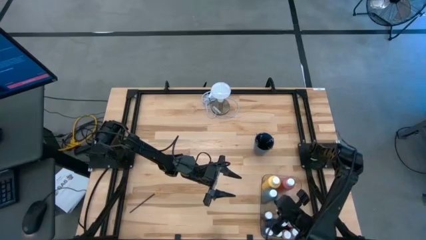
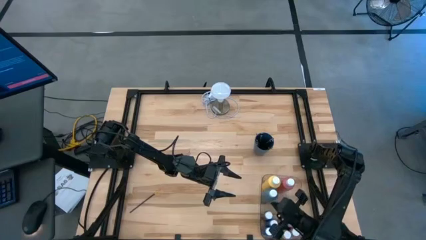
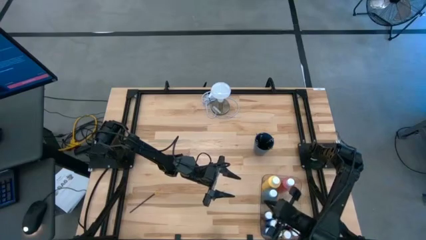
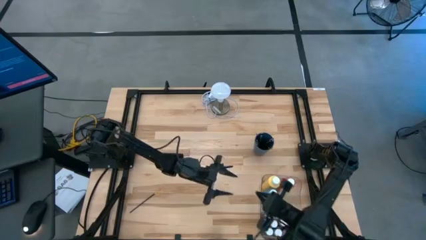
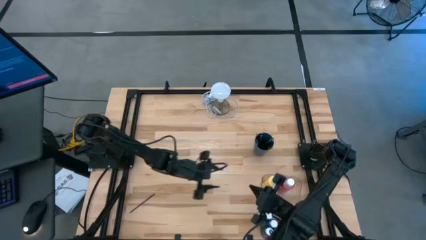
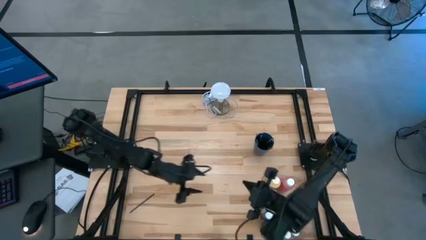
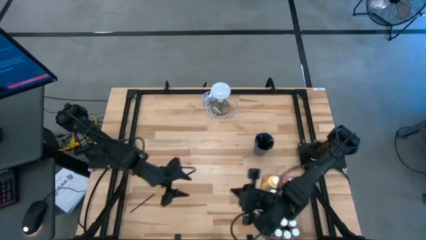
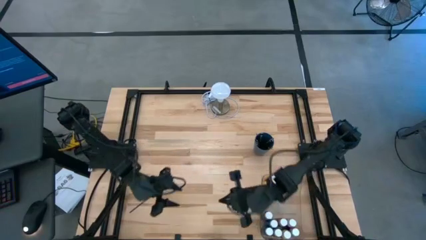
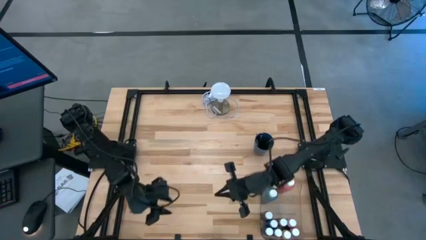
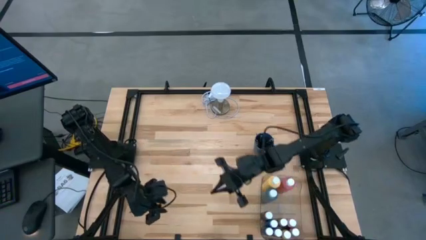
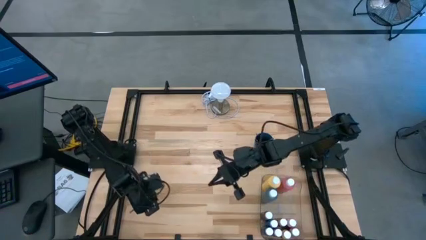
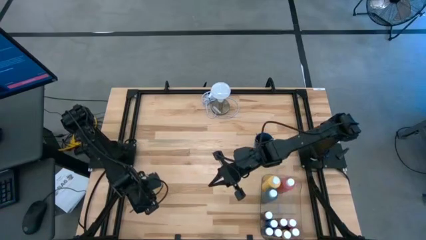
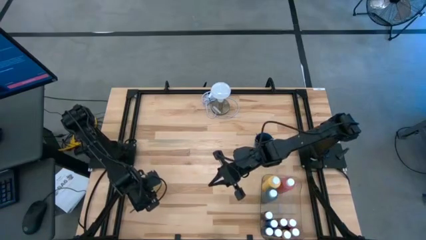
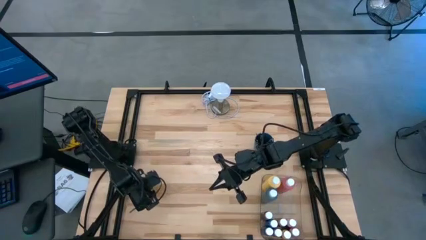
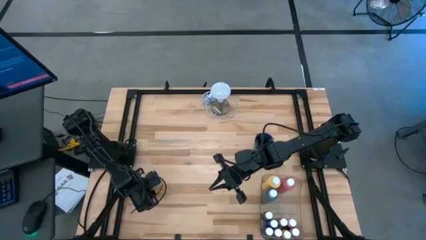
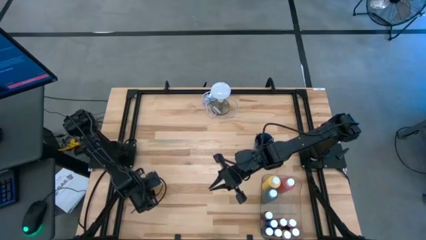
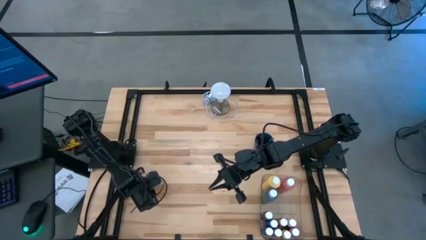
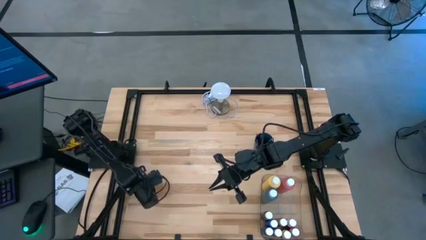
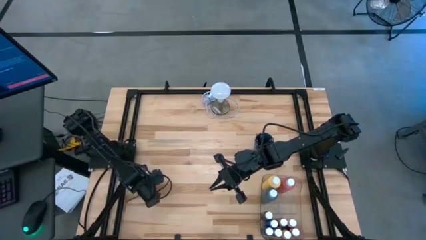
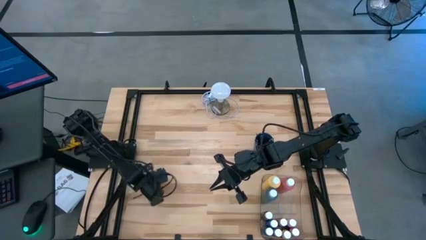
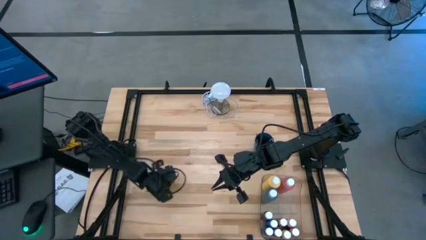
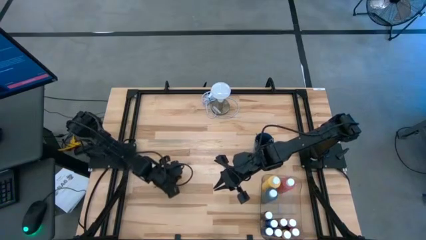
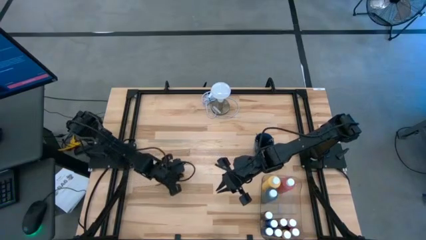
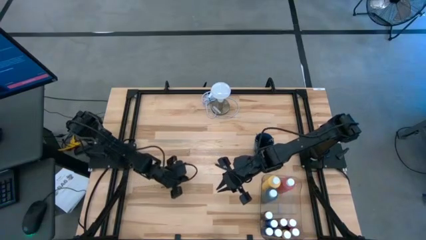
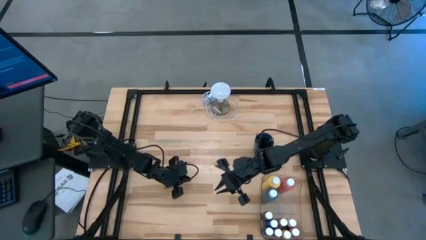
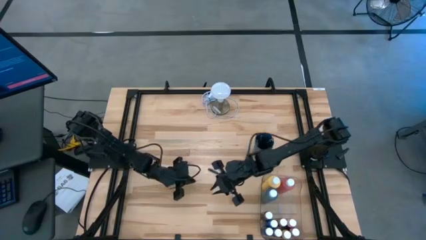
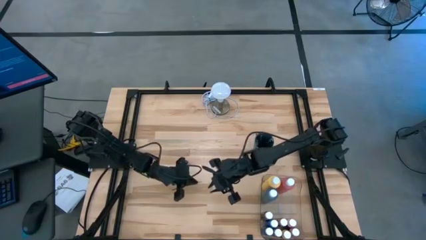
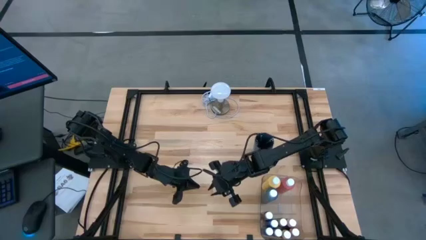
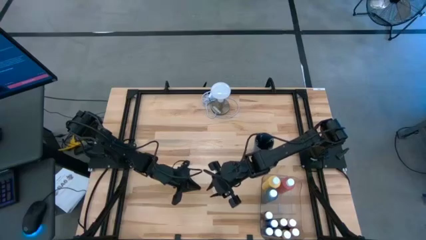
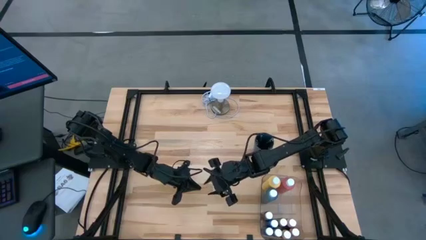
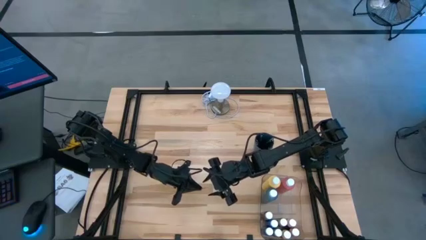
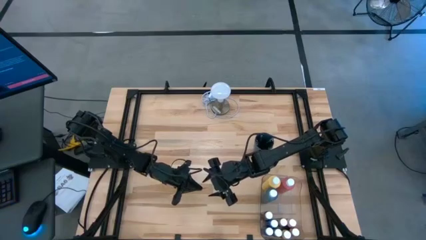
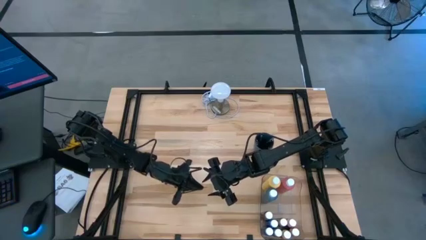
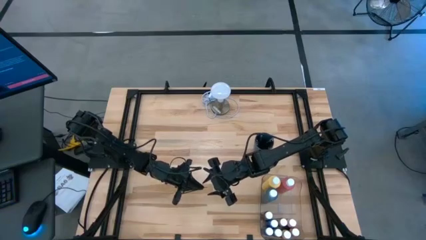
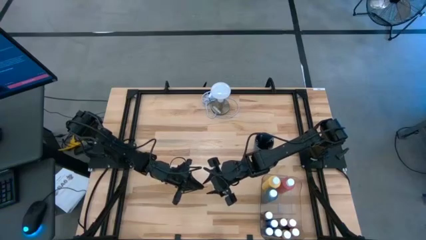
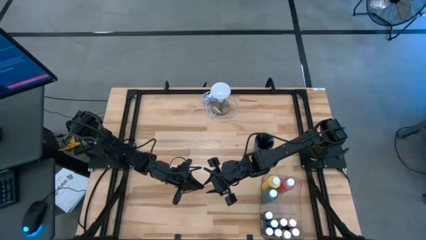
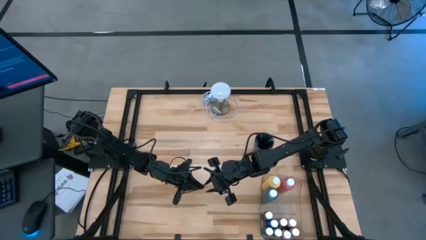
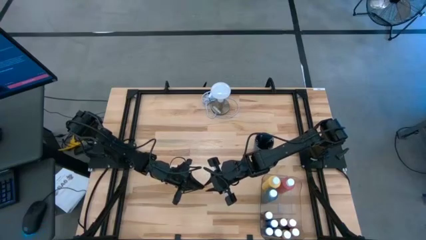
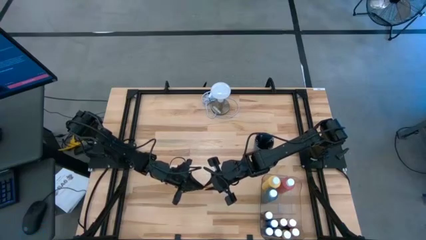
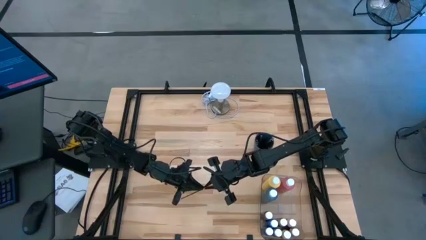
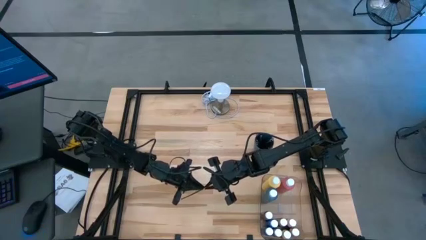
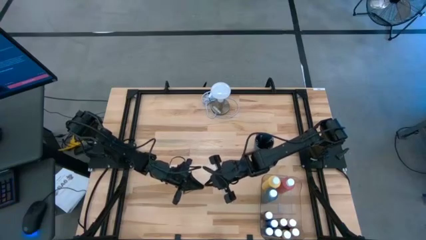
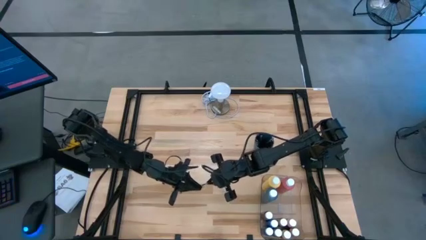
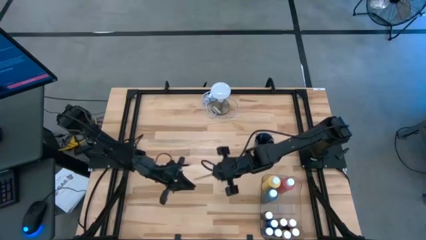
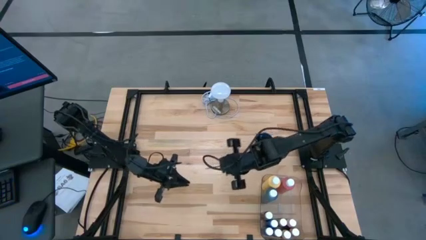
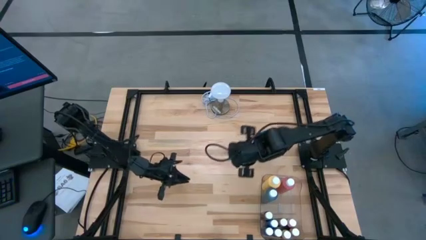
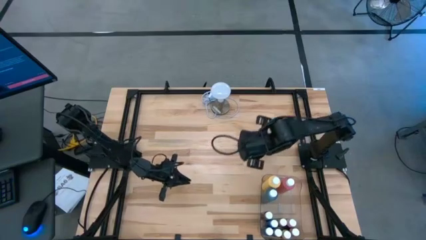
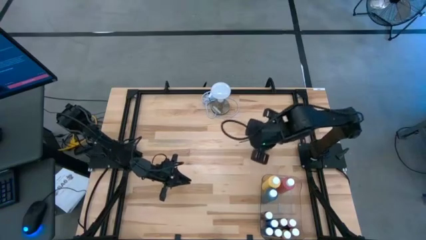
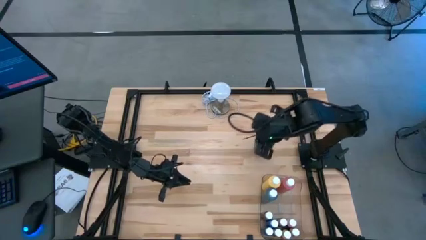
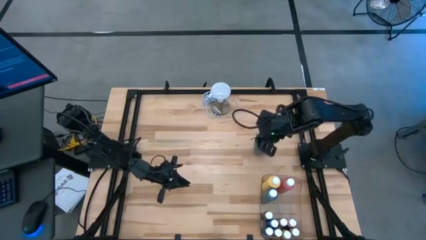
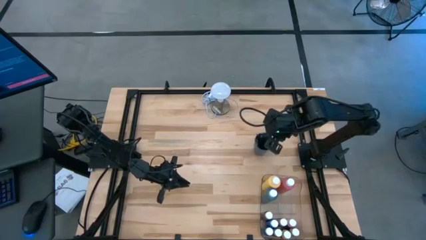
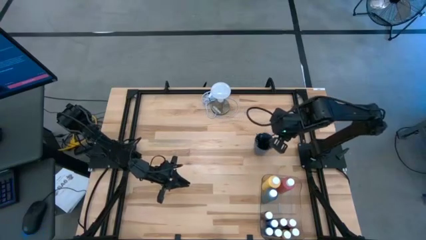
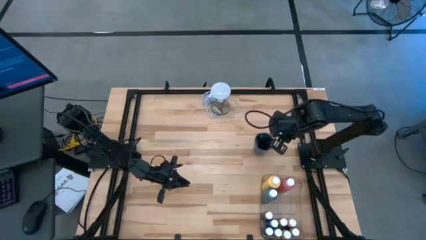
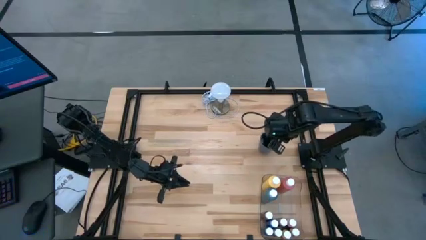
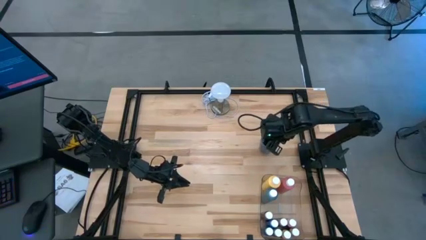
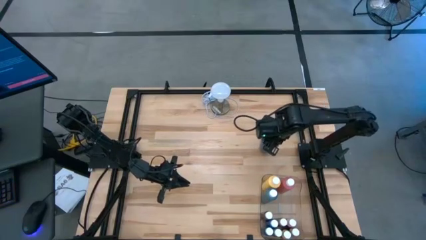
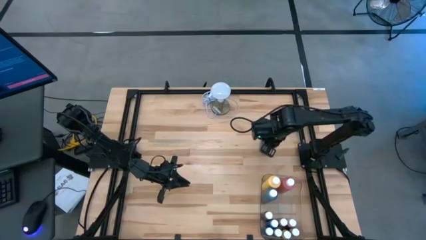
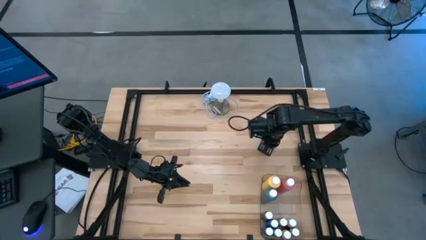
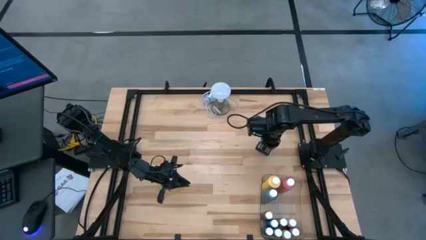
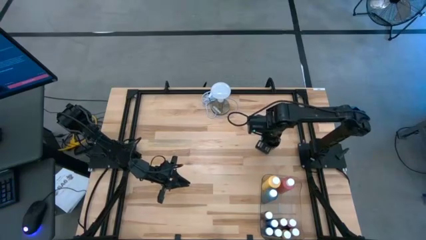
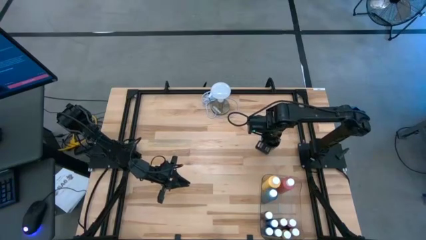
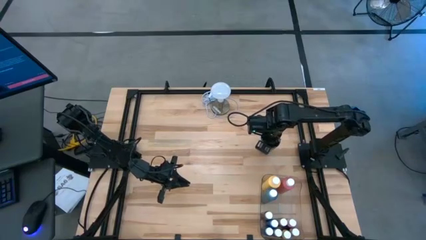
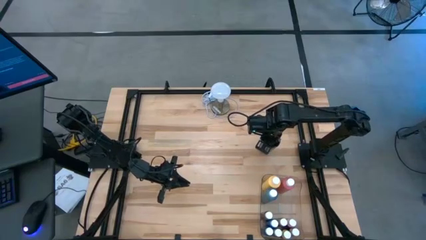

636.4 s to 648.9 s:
Task: Pick & Place Paint Supplies
Put the black gold paintbrush into the blue cup
